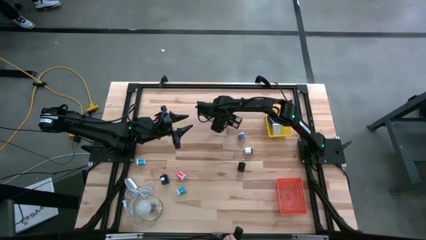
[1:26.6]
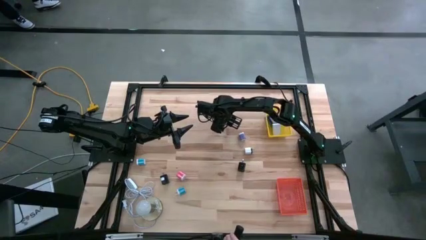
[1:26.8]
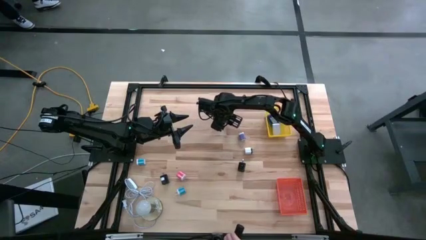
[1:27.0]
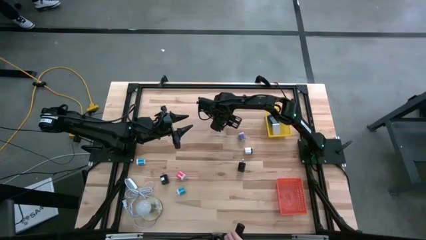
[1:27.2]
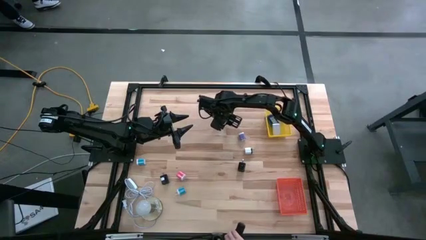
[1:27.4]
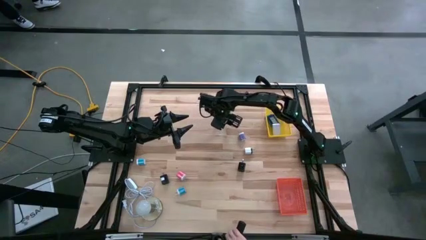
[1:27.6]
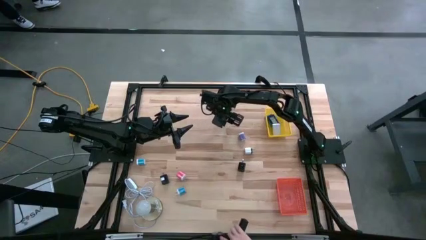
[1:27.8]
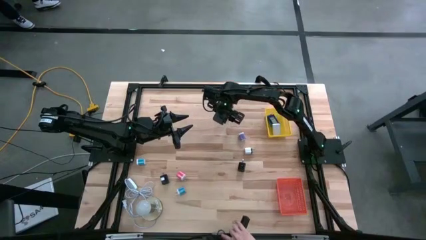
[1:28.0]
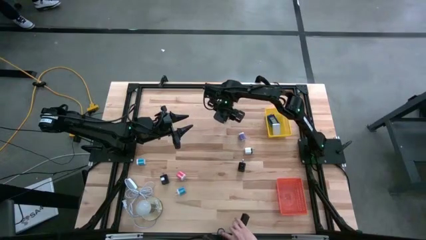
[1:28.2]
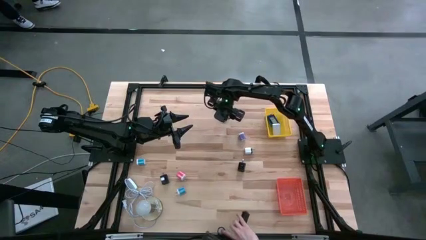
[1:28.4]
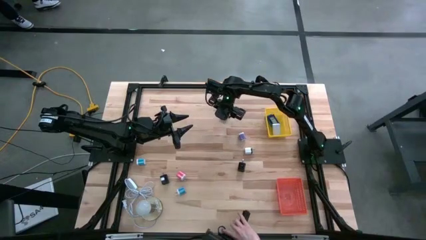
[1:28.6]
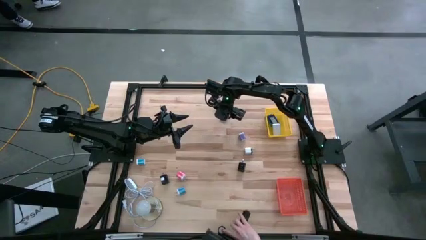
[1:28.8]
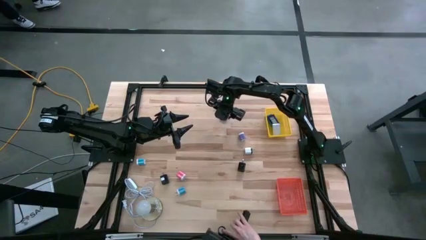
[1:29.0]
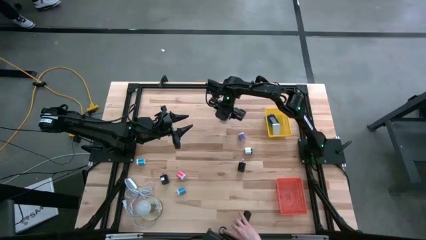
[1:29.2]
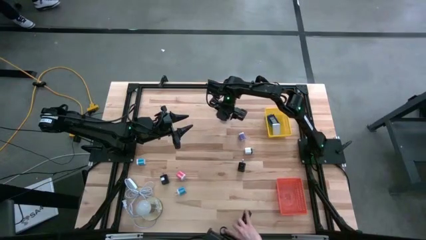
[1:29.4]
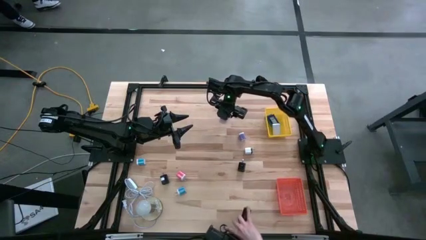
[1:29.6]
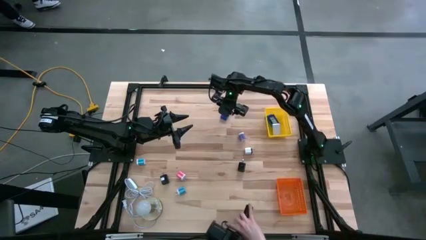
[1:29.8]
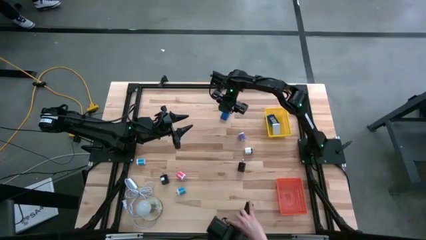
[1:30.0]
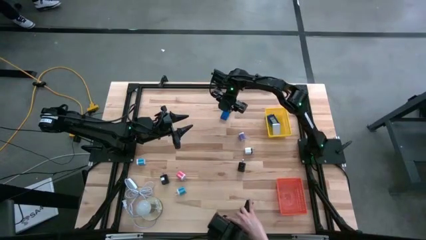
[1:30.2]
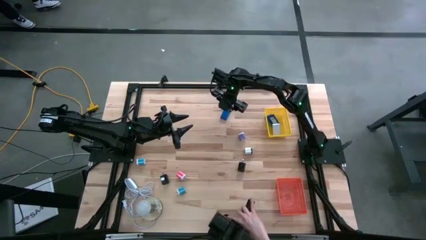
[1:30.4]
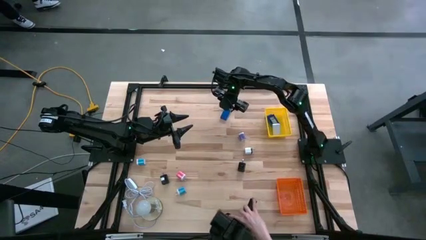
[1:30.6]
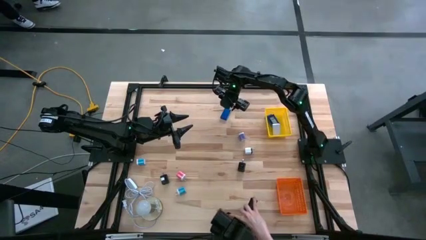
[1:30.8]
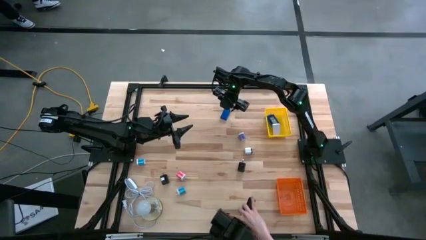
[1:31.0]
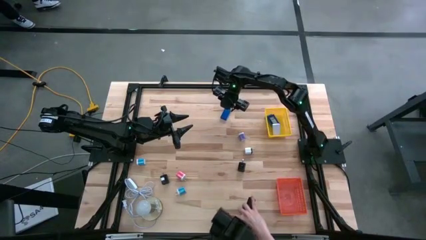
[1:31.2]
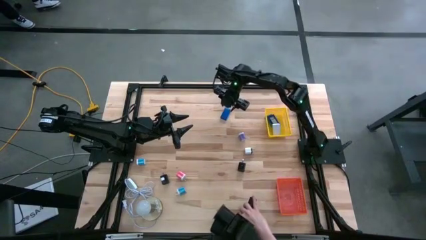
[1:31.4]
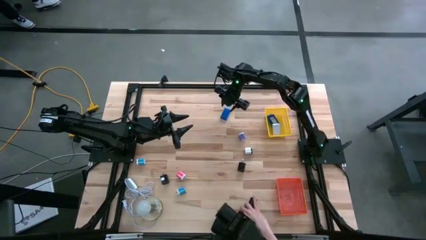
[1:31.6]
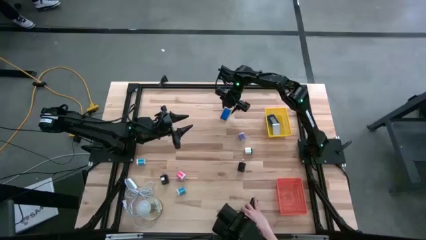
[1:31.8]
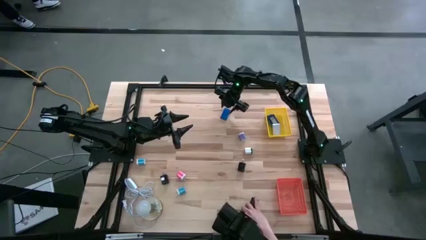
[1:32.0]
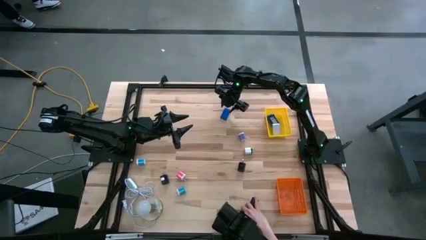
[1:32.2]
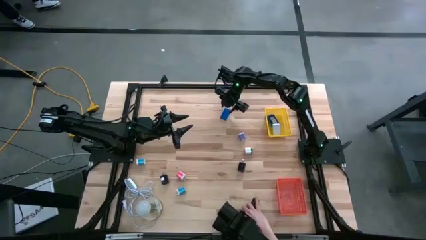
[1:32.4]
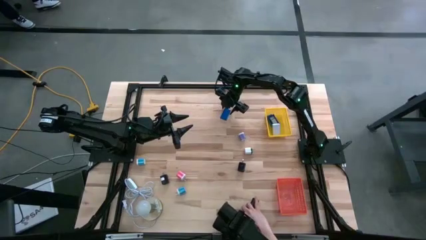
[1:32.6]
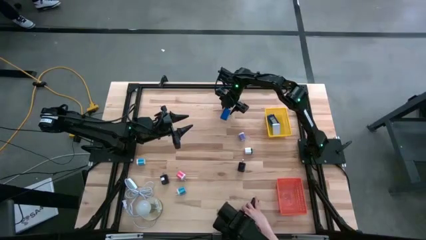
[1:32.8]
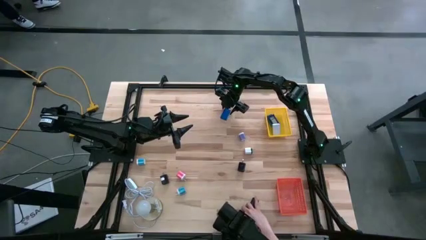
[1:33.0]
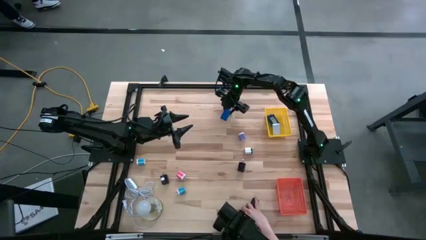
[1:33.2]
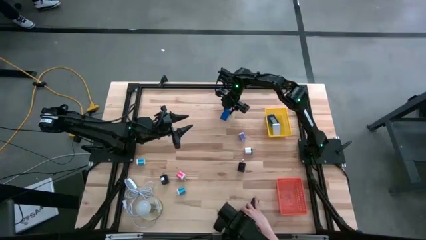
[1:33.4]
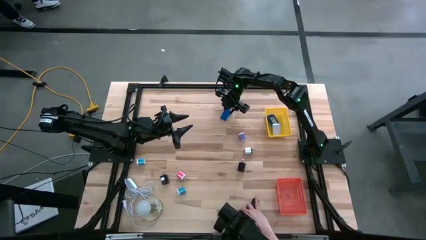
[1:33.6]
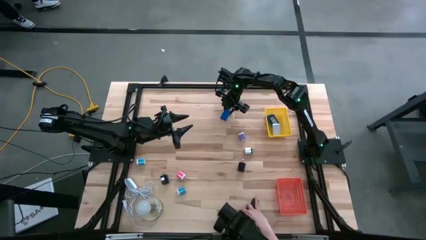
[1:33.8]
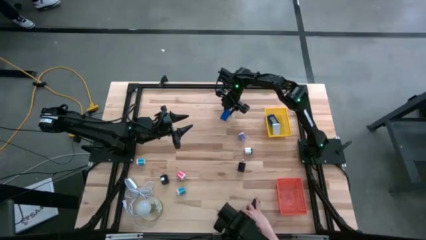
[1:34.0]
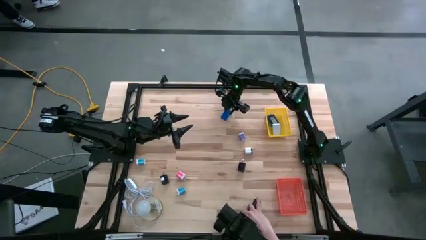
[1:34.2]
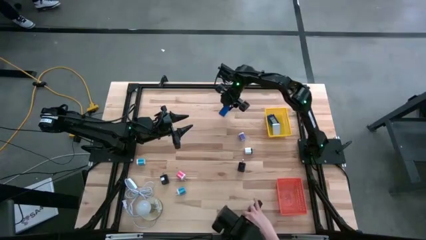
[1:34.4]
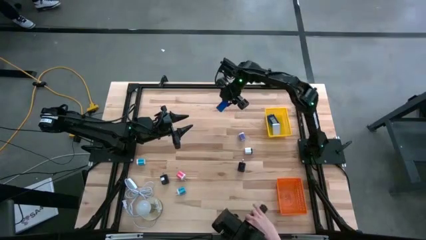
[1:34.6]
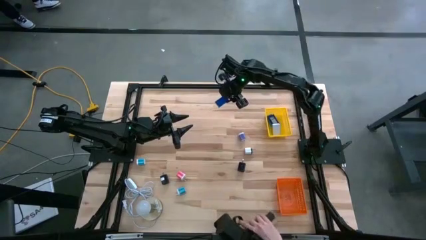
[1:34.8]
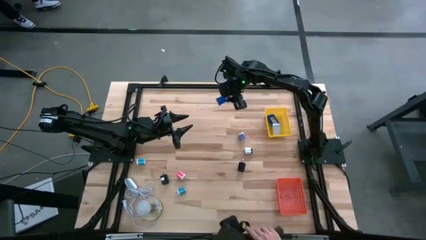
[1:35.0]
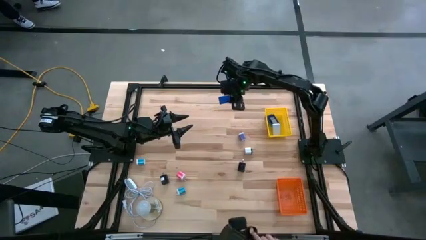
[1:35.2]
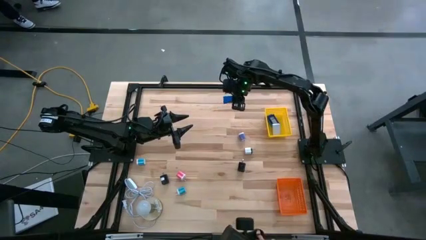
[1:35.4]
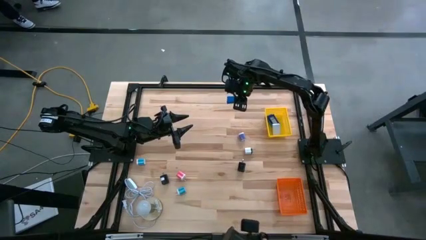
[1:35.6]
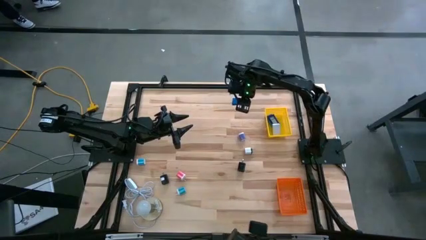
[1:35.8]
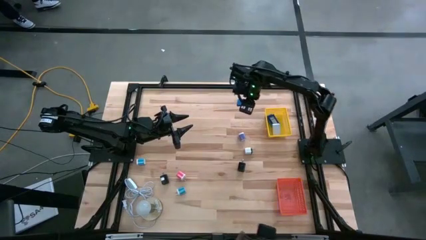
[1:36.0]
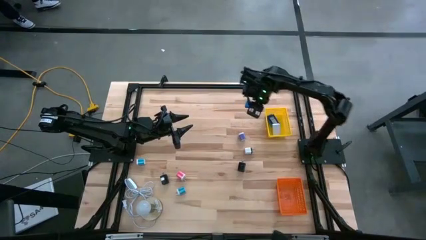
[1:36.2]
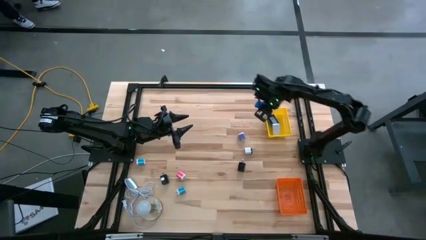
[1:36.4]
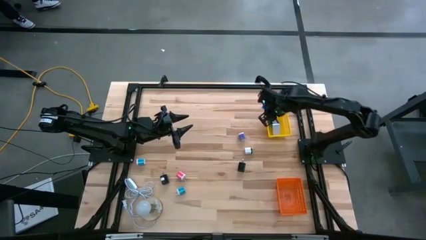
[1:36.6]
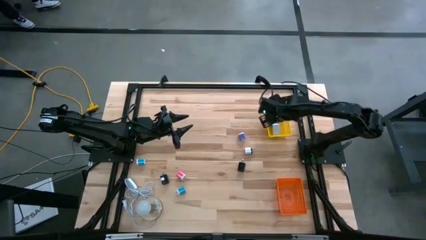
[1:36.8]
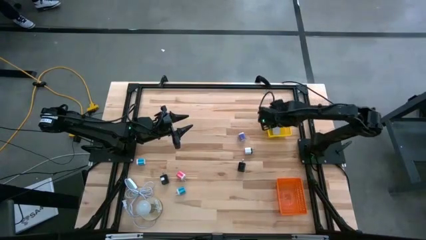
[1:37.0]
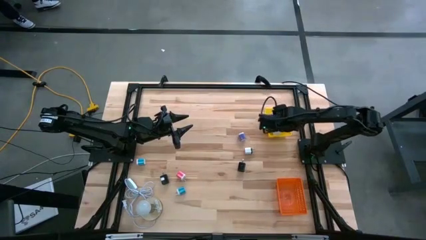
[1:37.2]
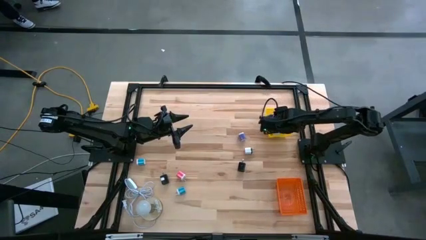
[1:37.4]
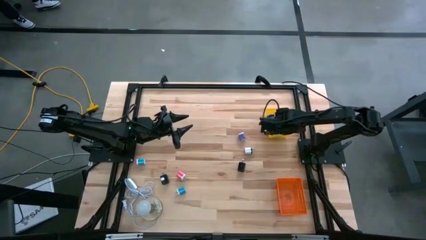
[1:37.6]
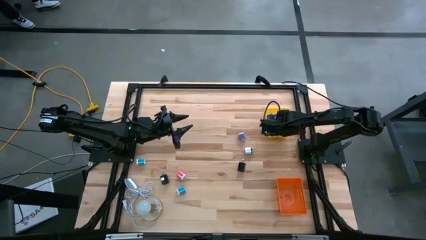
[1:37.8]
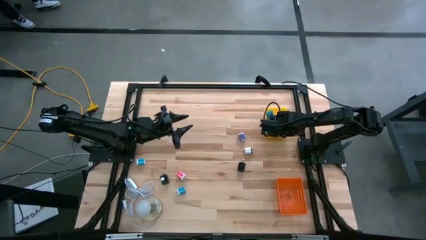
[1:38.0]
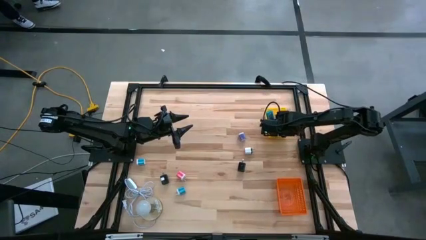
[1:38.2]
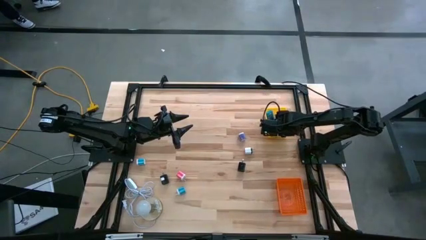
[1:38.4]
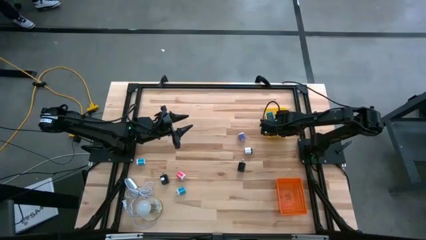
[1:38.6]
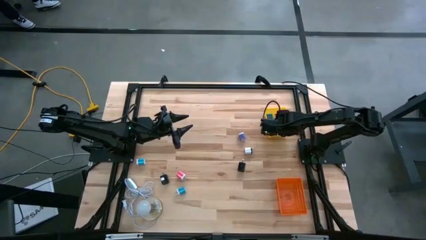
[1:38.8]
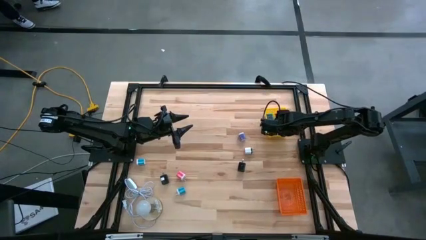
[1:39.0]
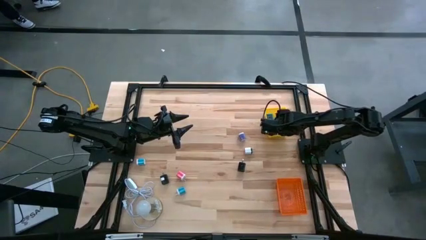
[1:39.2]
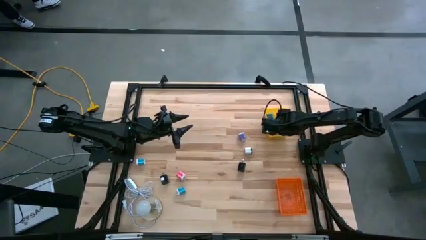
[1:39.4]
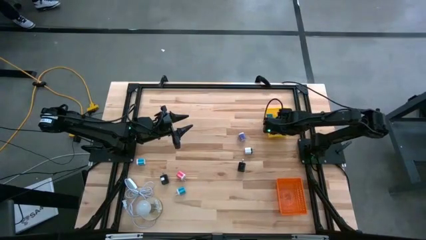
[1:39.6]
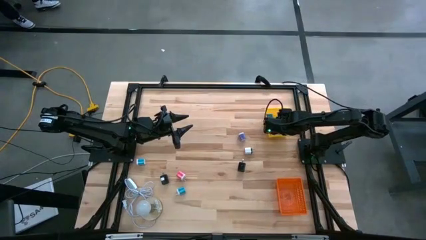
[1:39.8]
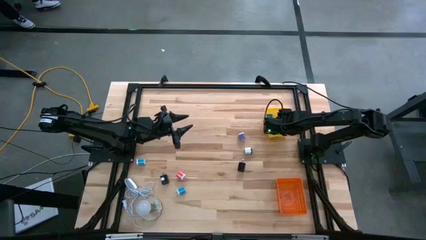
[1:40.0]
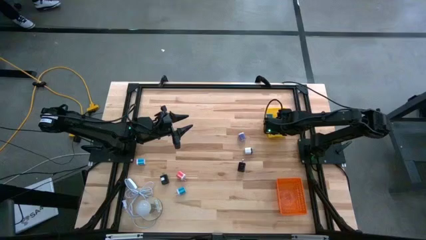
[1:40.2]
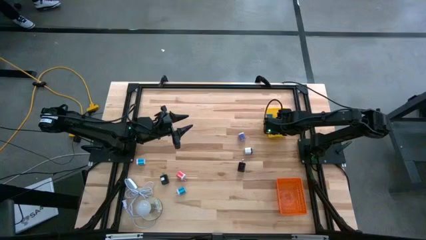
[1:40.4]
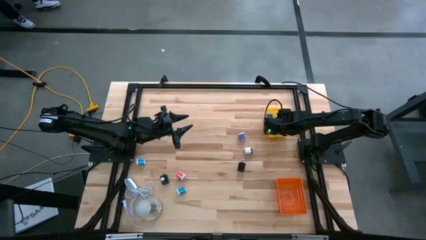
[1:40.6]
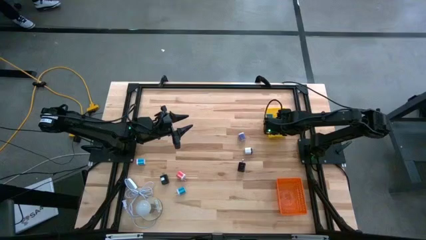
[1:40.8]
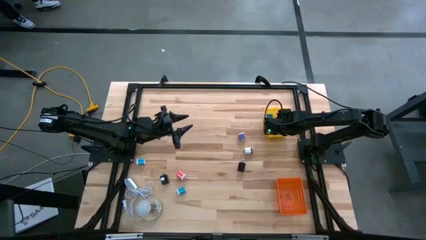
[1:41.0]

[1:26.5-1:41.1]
Task: Pick & Place Office items
Put the blue digital clock into the yellow bin

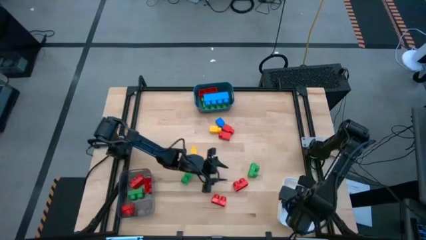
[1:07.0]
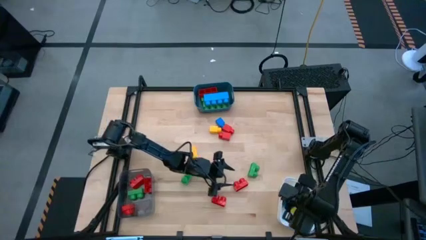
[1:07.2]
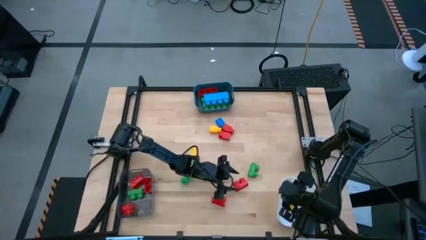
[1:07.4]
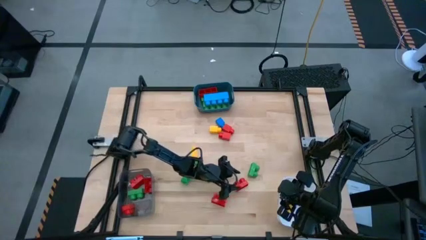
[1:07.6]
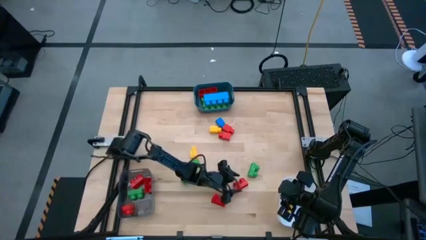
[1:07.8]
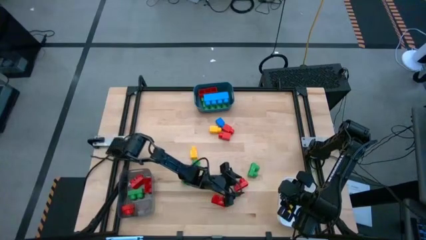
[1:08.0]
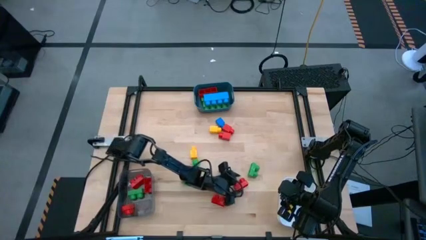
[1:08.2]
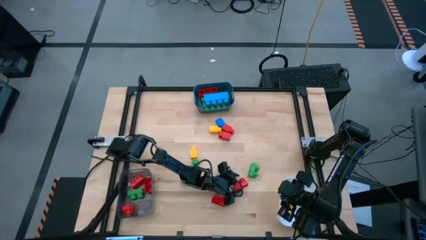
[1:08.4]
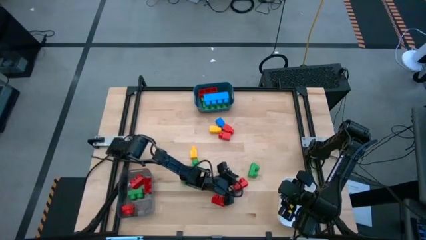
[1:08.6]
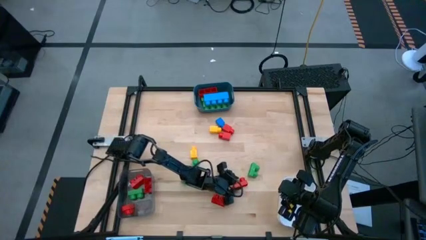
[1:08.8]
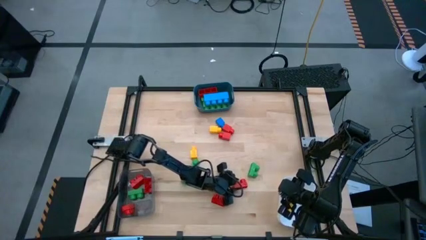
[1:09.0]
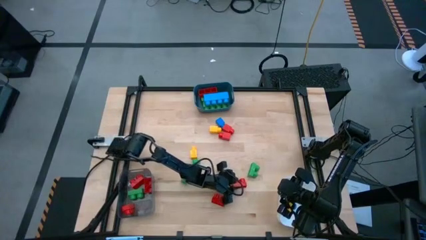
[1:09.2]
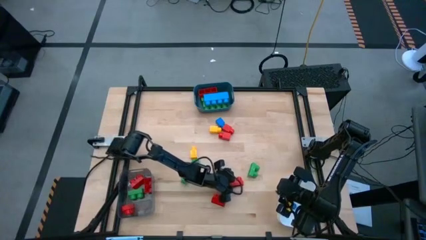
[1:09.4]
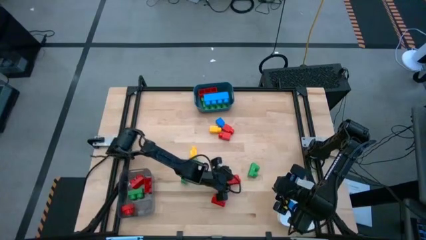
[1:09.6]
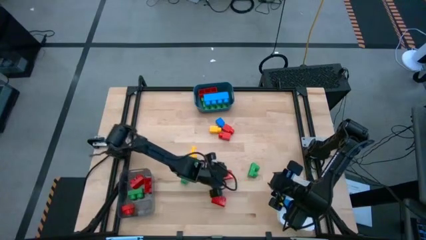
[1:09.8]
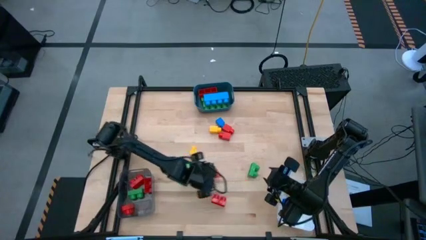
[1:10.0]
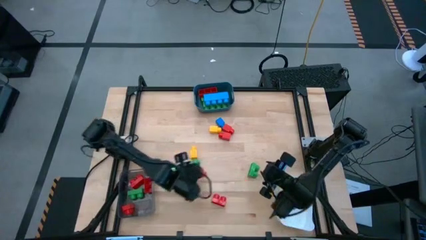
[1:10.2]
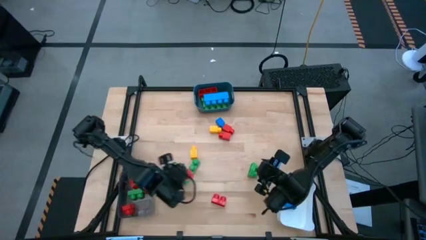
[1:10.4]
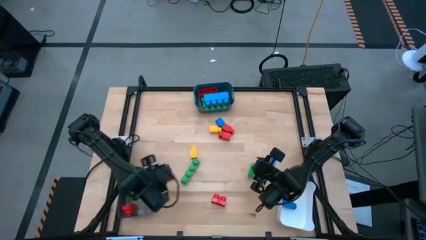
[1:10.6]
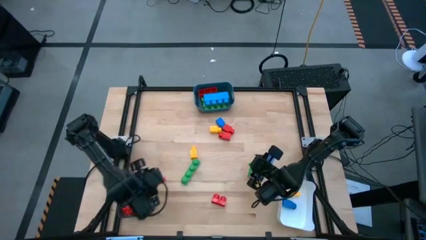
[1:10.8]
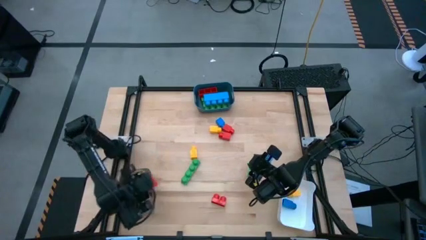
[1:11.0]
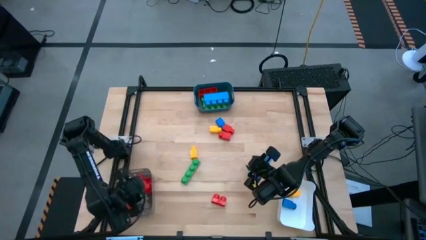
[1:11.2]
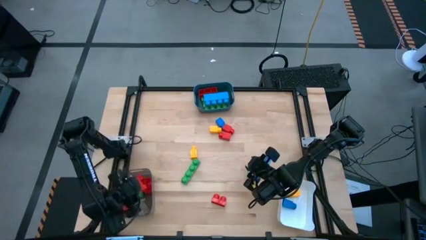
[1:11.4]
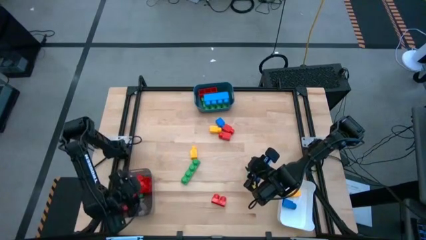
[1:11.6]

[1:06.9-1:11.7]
Task: Sort blocks by size
Put the red game piece into the grey container
